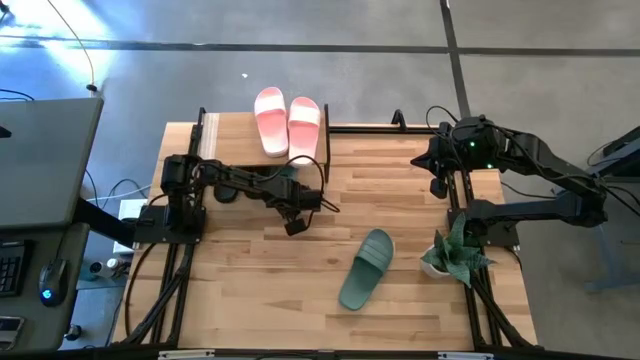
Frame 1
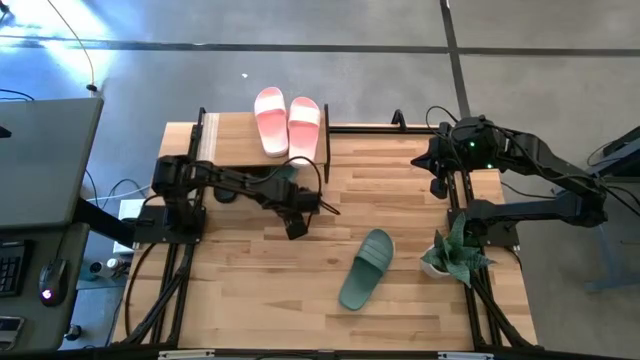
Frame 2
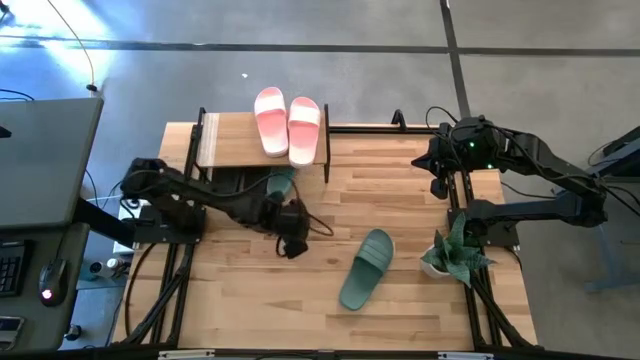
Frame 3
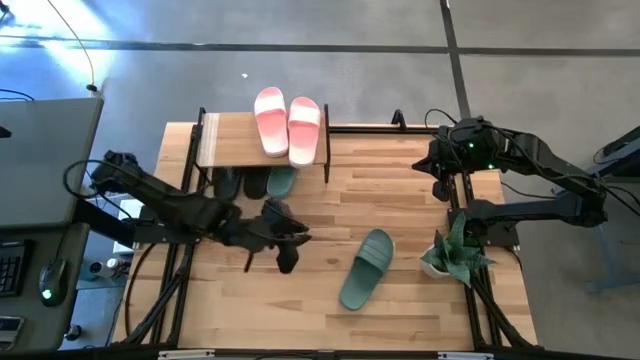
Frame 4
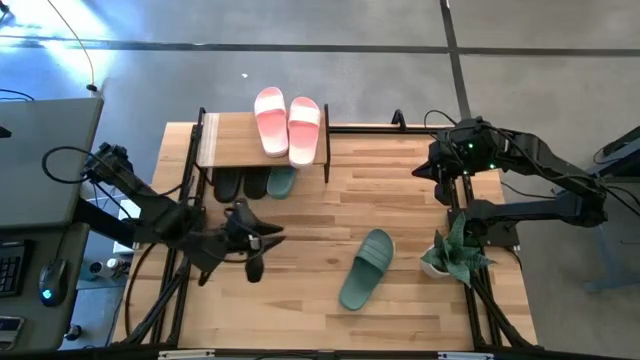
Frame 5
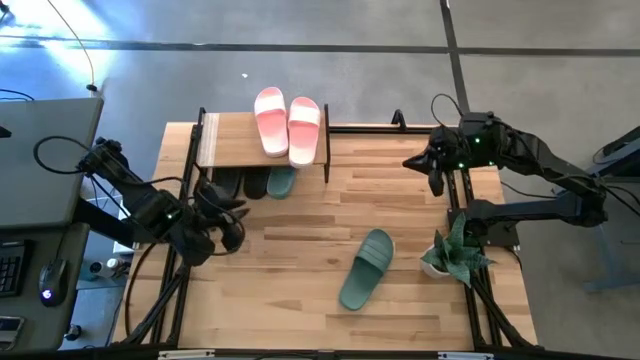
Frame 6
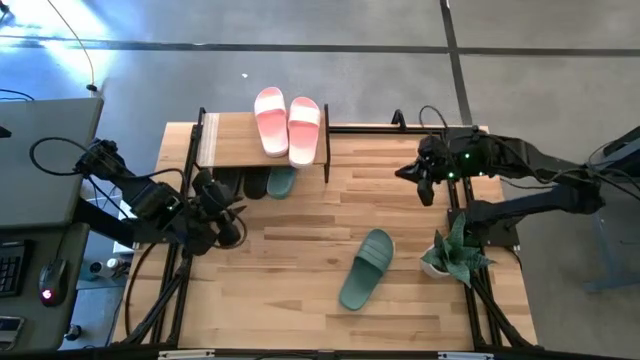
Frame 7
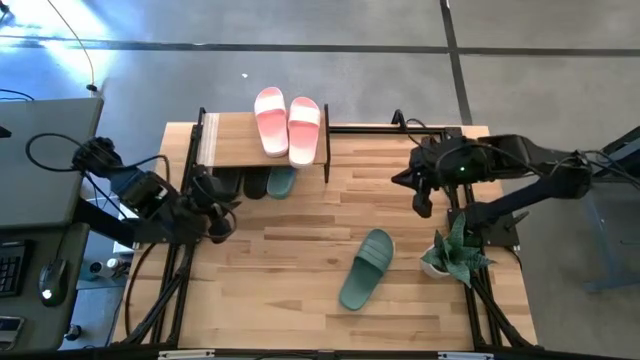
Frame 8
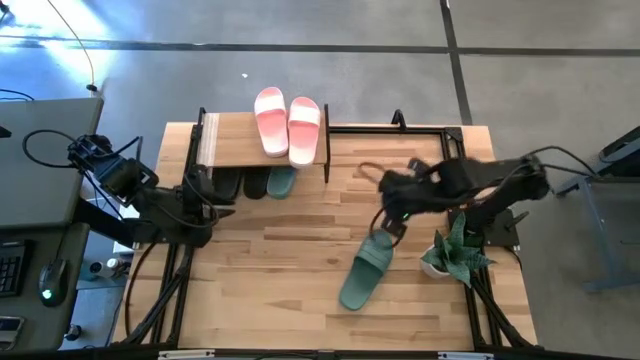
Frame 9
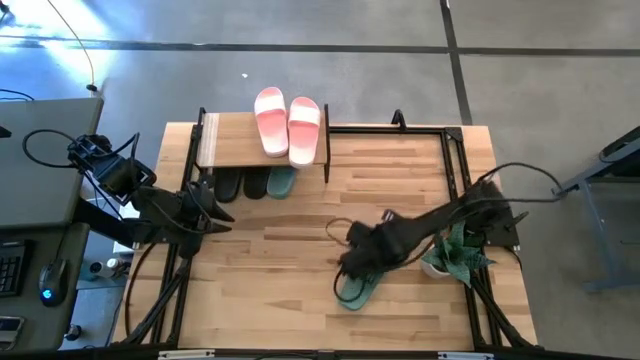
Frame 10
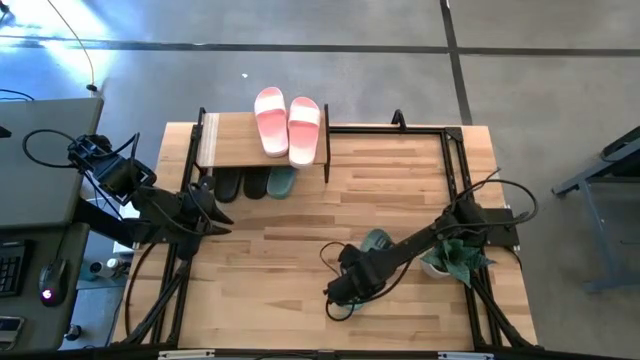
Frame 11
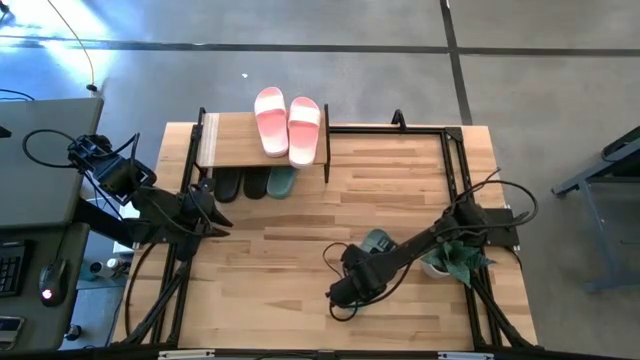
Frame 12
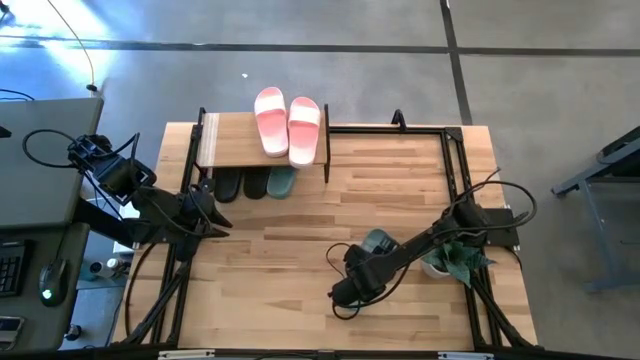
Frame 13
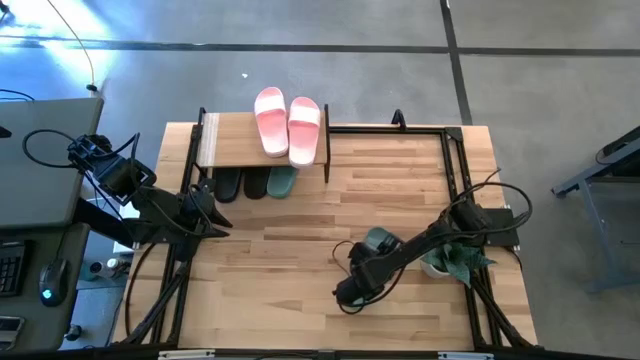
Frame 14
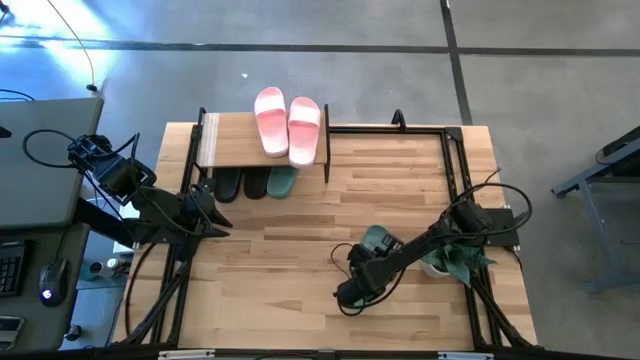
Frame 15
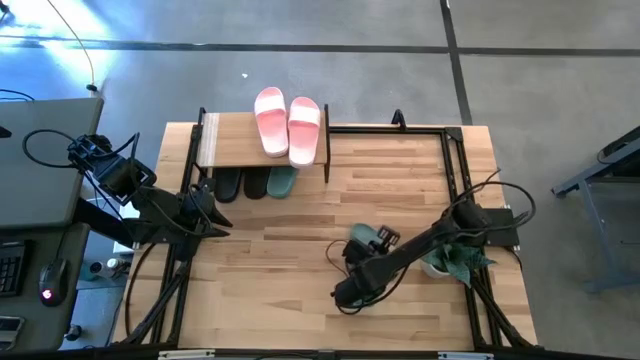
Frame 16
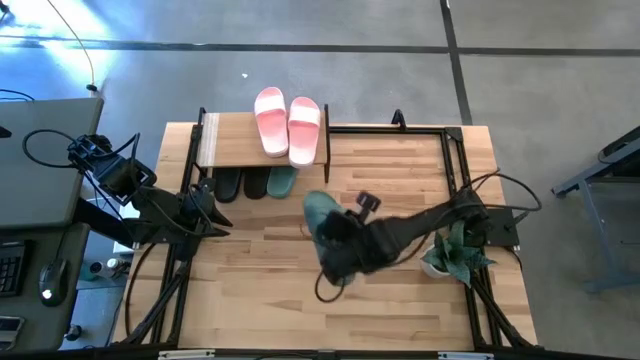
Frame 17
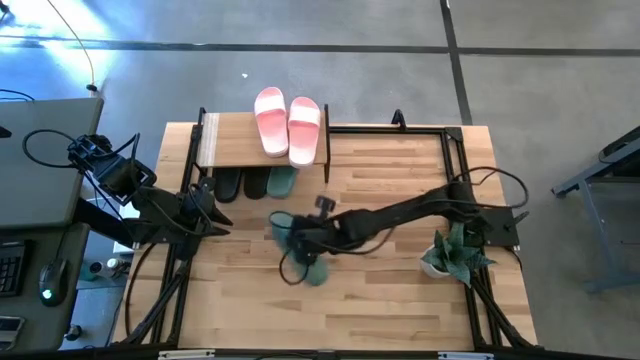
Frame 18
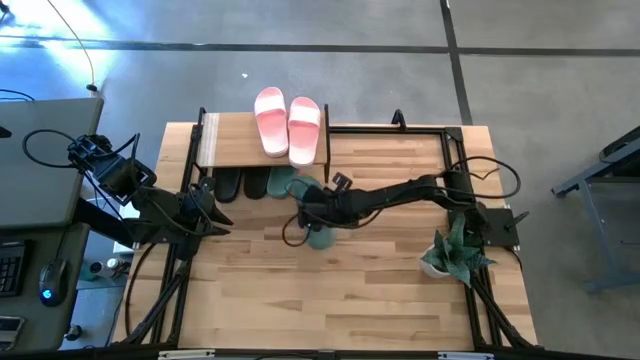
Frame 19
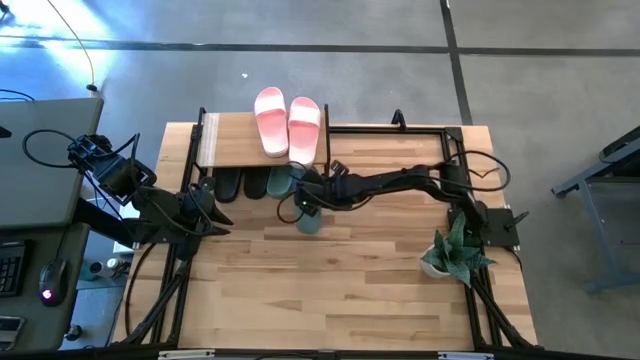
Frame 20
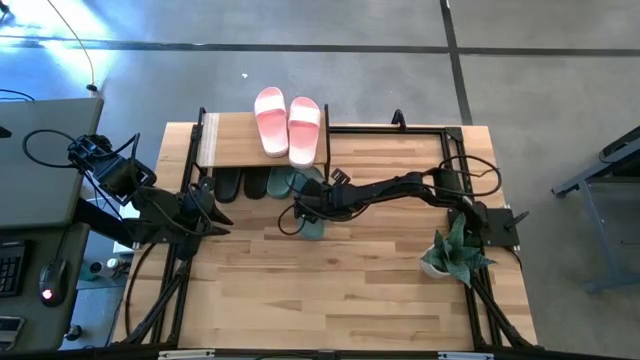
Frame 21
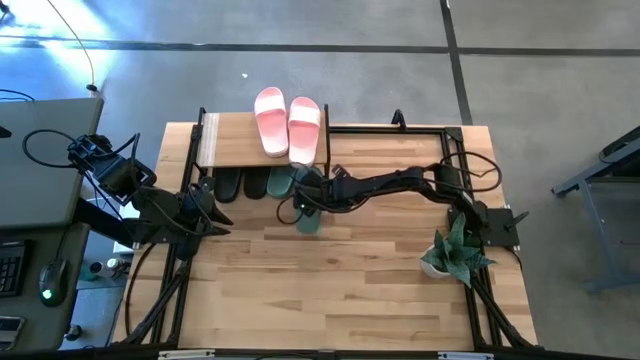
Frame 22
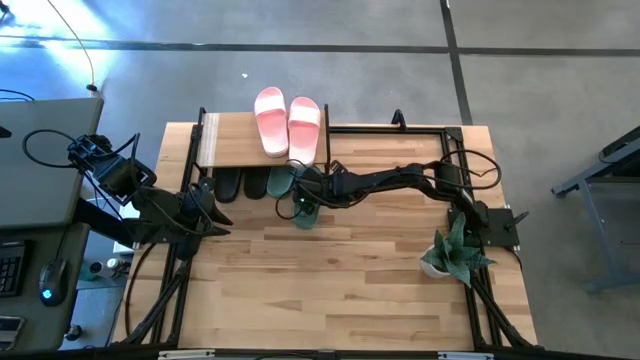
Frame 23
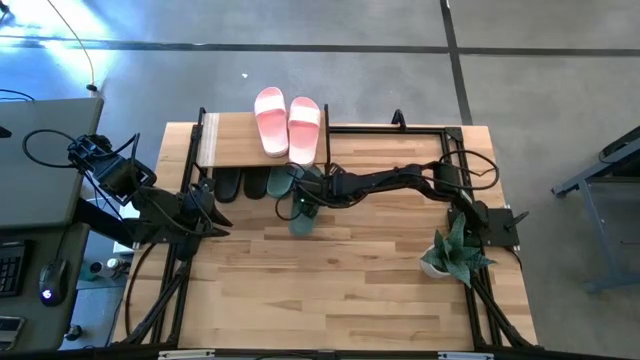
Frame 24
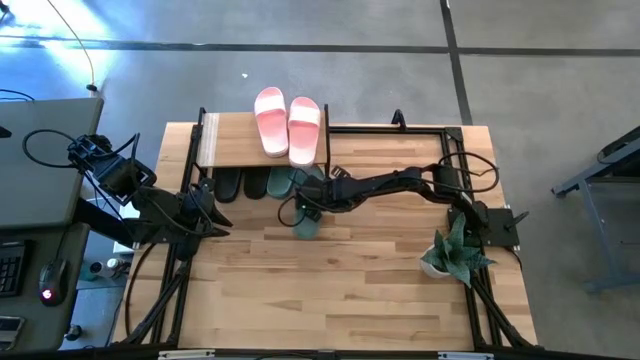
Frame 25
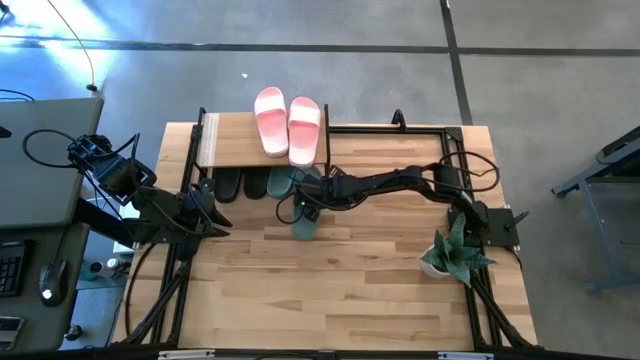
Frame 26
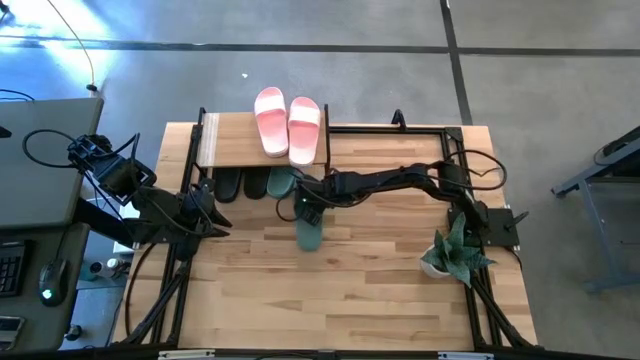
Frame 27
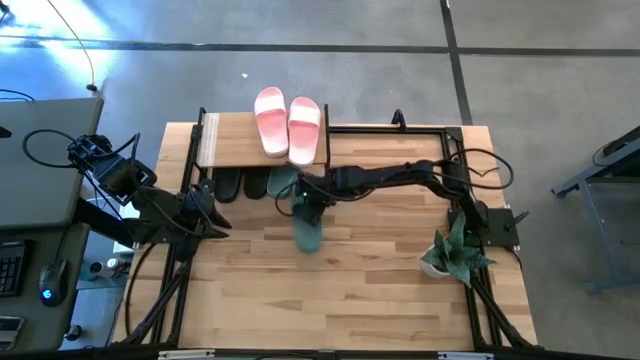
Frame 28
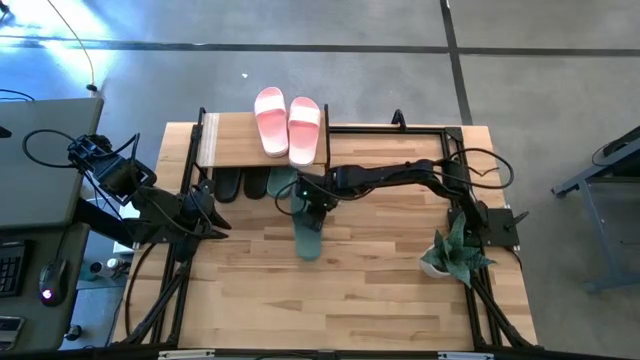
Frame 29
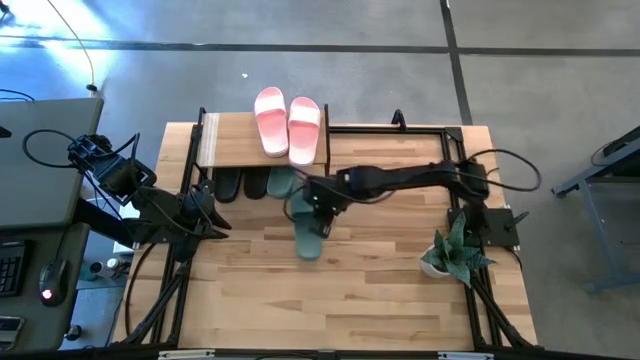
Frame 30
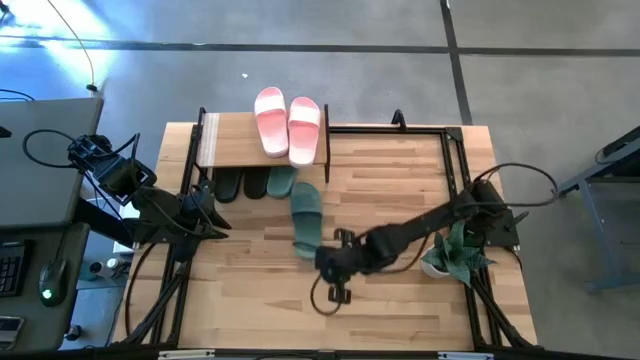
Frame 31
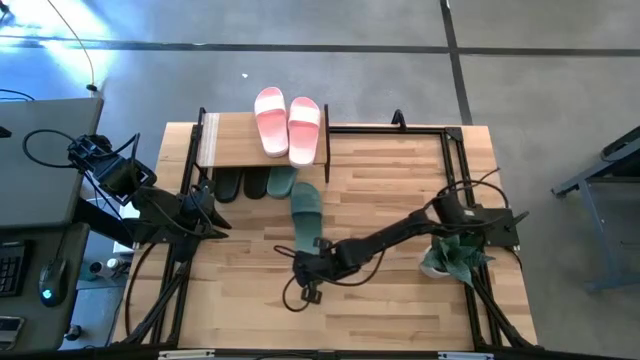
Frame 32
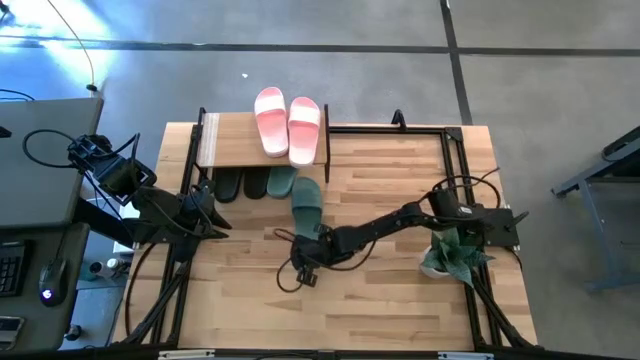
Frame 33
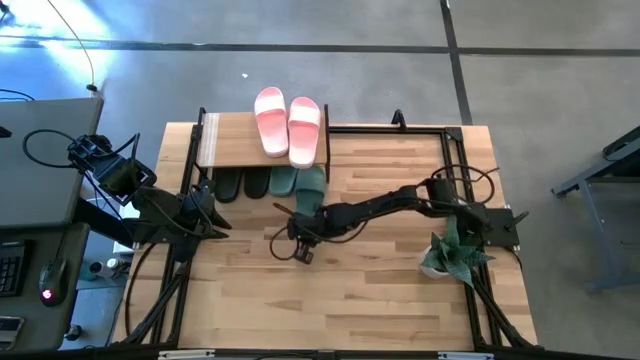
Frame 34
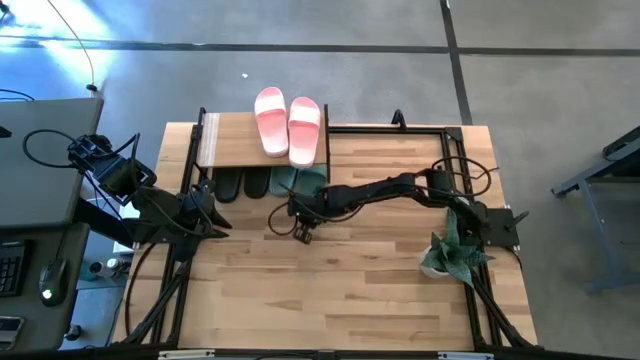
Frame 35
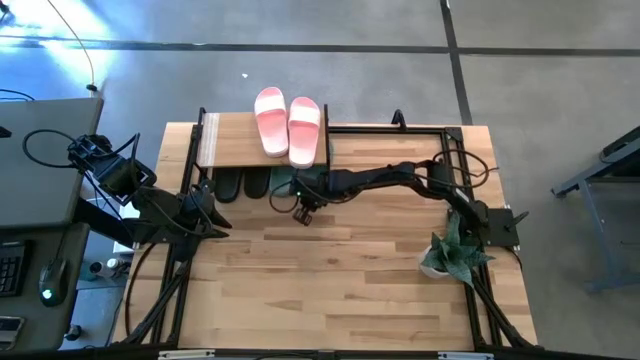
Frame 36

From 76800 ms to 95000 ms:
Task: Pick and place slides into the shelf
Put the green slide under the shelf

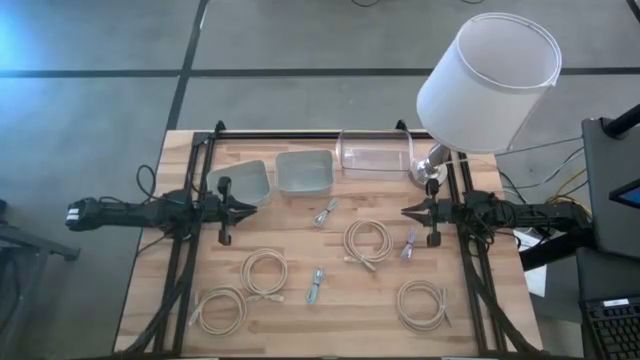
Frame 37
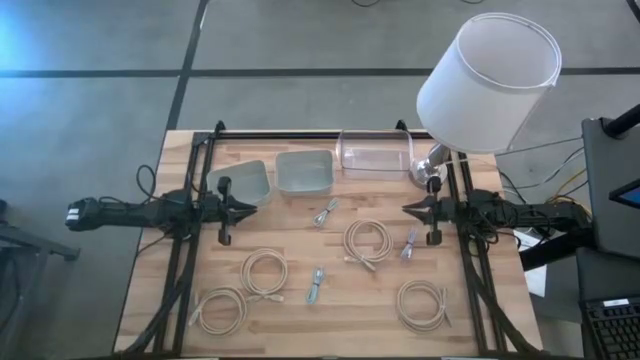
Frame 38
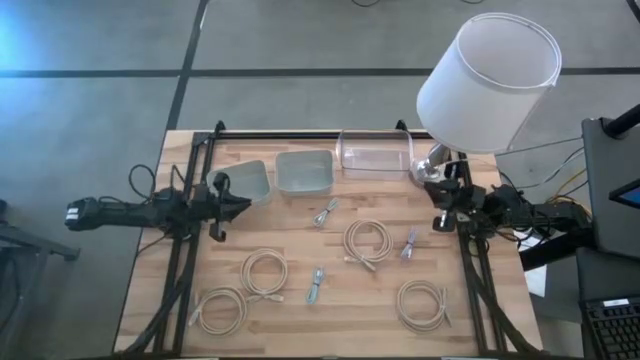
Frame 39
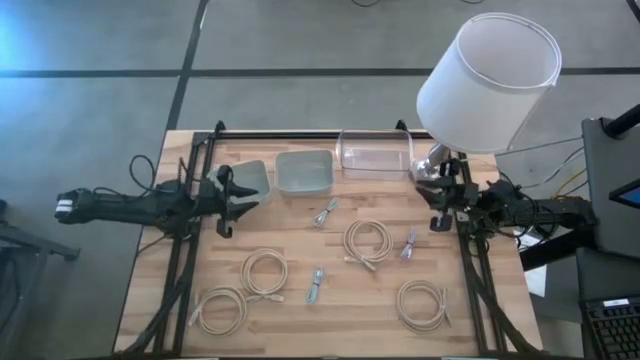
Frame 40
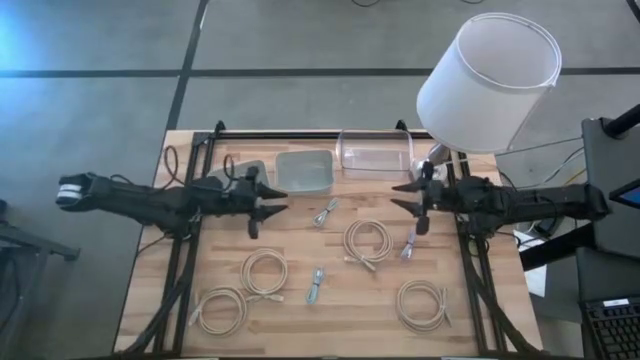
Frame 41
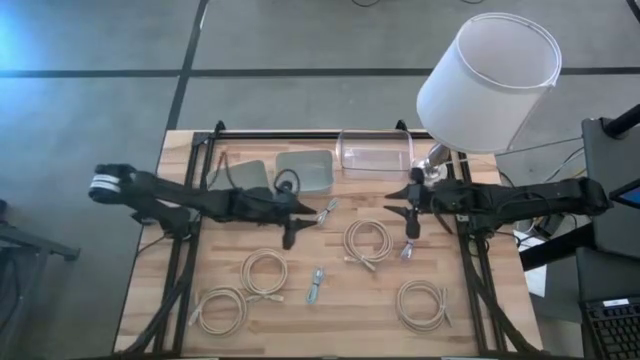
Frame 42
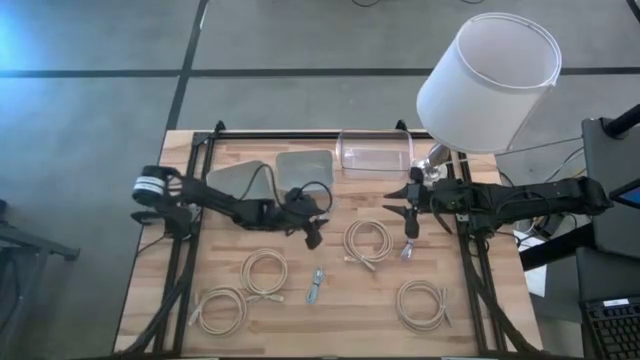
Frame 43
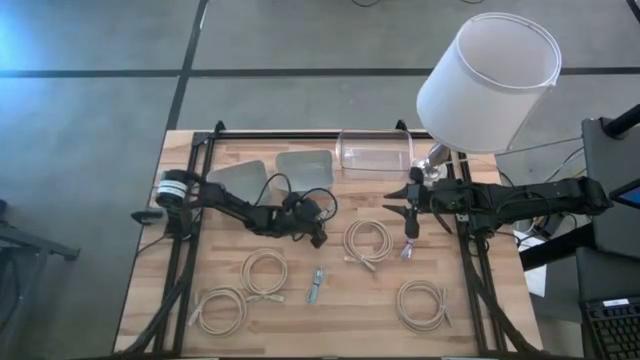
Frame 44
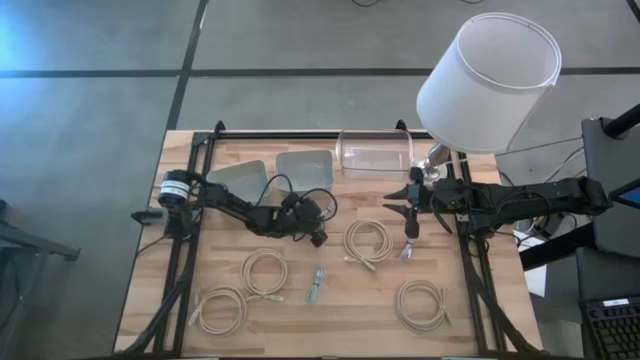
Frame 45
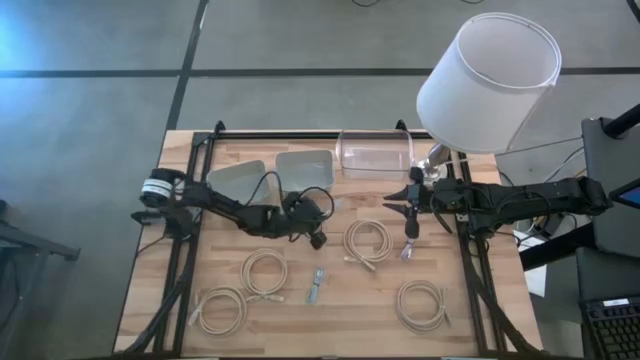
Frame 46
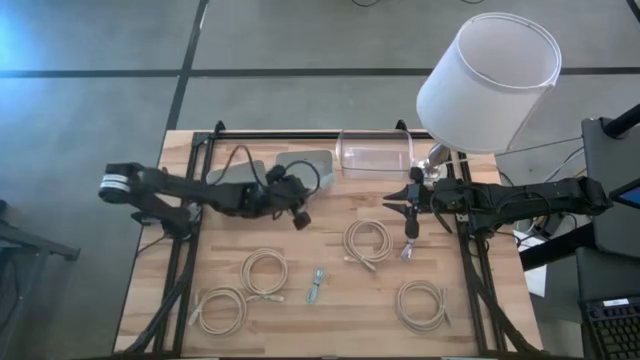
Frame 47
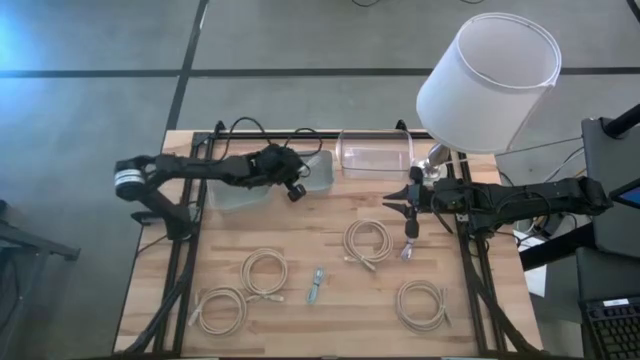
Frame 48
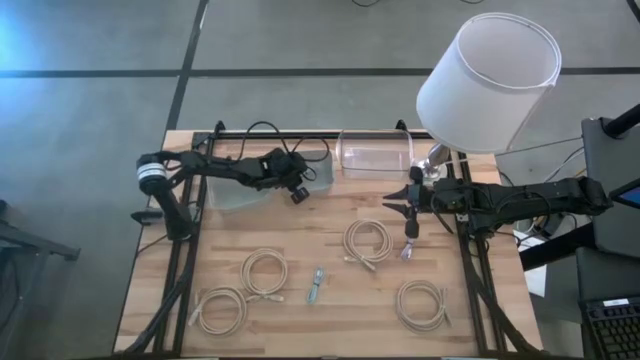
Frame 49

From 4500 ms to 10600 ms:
Task: Pick & Place USB Port
Put the top light blue charger cable into the right gray bin
